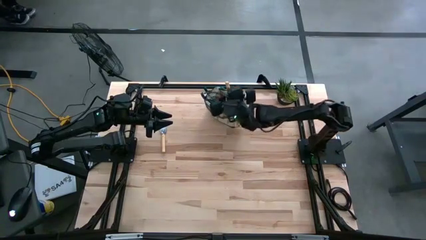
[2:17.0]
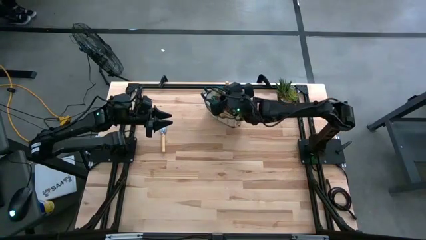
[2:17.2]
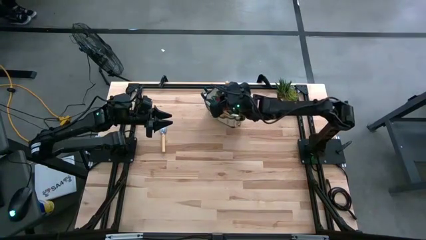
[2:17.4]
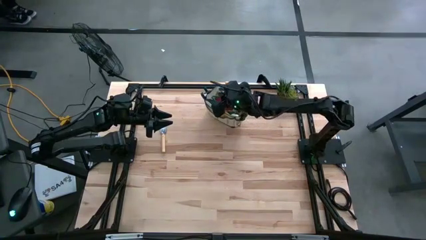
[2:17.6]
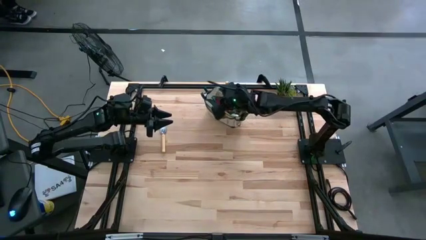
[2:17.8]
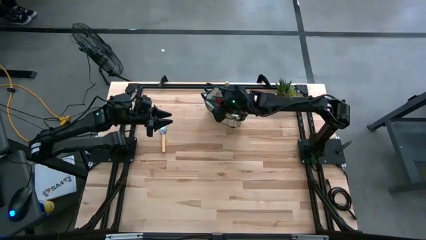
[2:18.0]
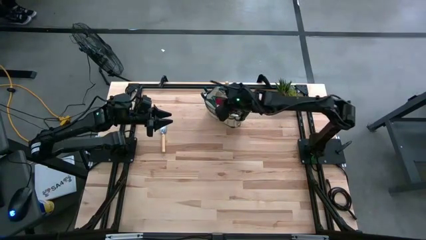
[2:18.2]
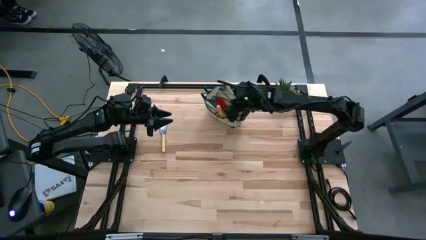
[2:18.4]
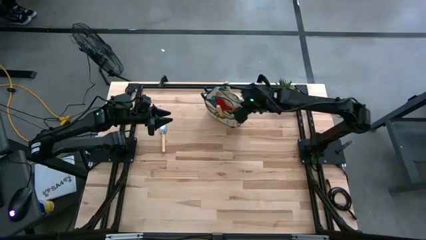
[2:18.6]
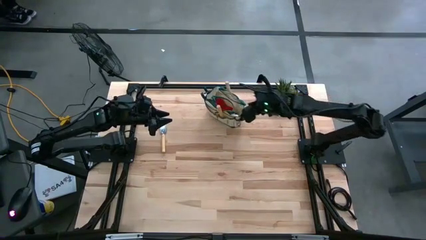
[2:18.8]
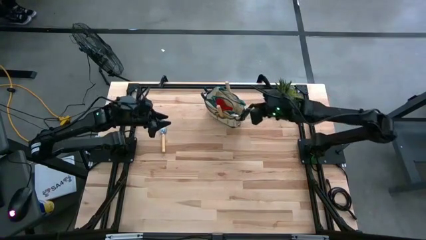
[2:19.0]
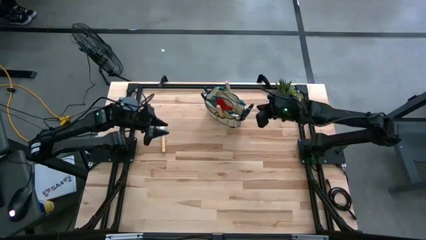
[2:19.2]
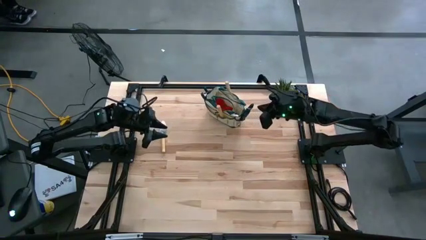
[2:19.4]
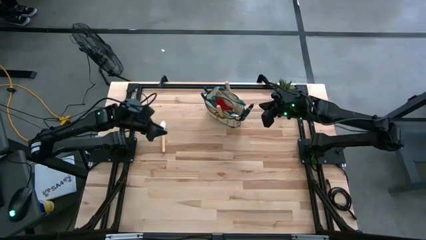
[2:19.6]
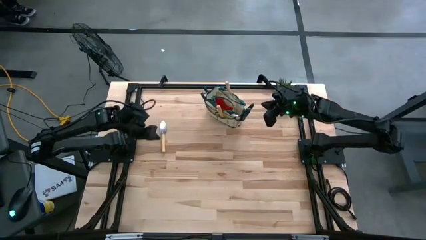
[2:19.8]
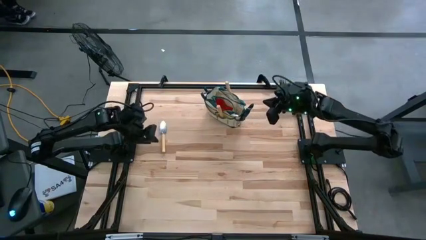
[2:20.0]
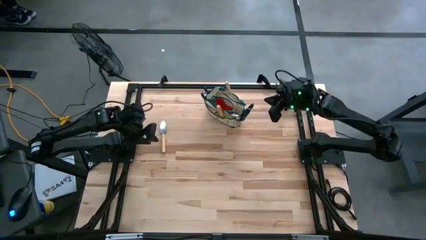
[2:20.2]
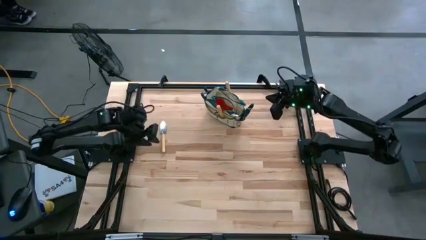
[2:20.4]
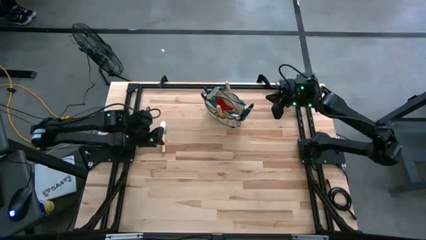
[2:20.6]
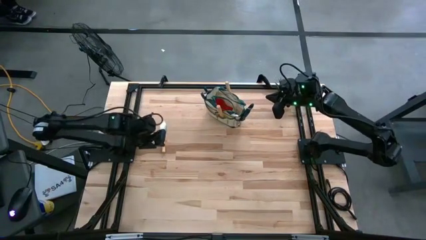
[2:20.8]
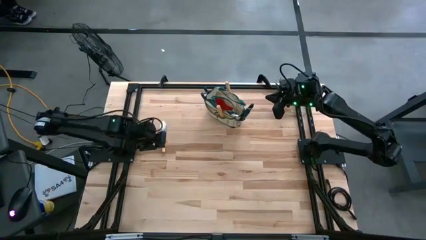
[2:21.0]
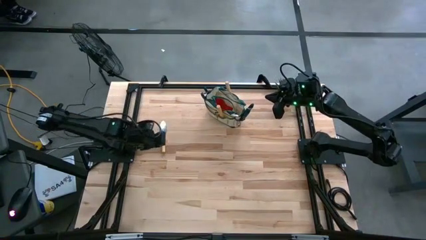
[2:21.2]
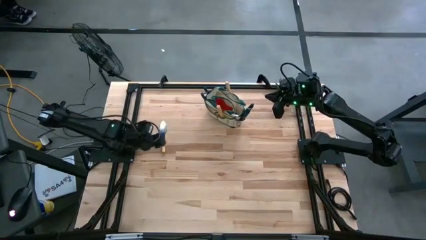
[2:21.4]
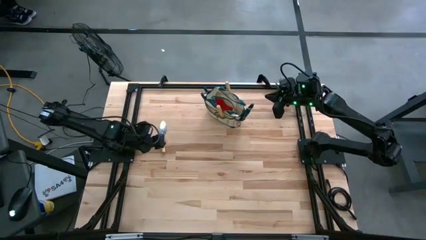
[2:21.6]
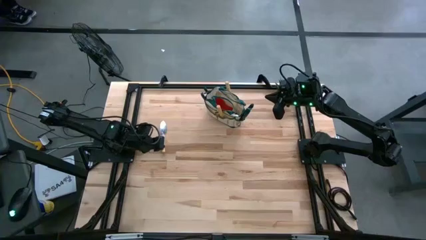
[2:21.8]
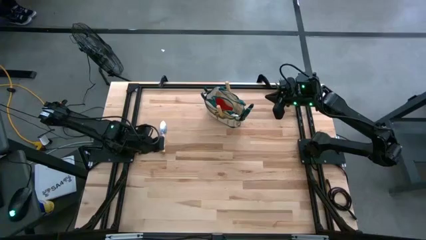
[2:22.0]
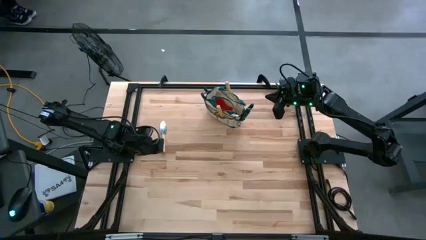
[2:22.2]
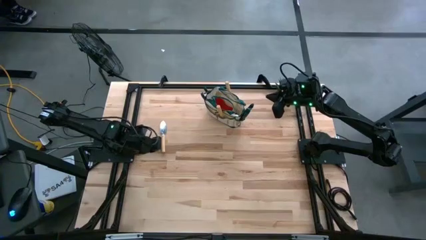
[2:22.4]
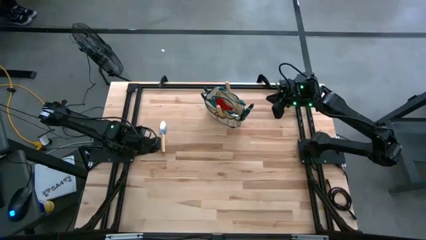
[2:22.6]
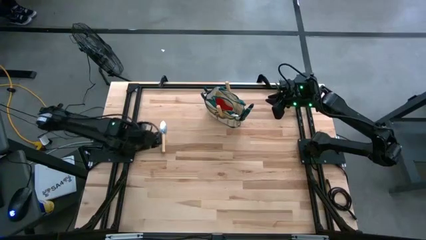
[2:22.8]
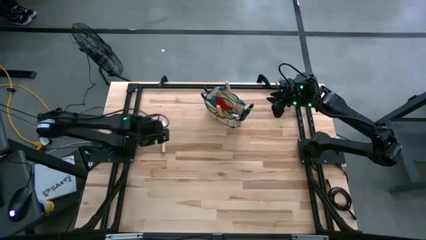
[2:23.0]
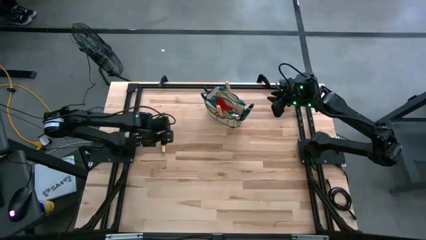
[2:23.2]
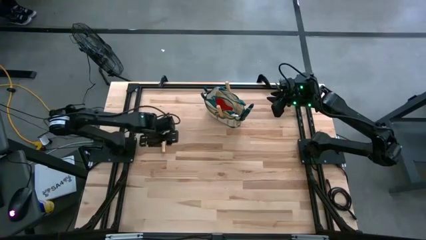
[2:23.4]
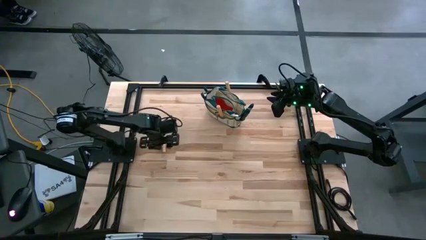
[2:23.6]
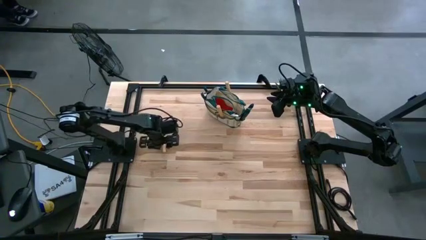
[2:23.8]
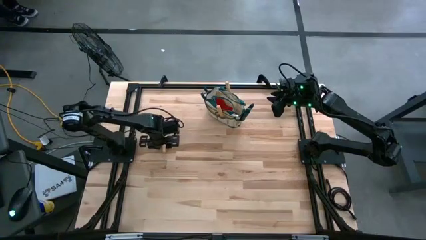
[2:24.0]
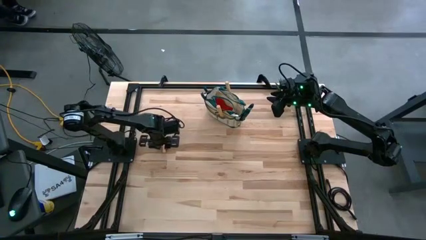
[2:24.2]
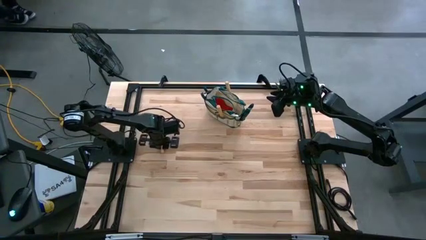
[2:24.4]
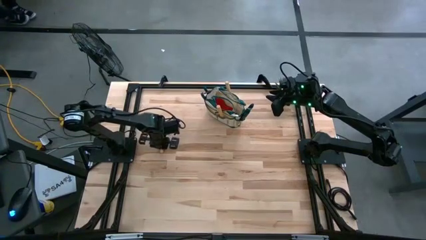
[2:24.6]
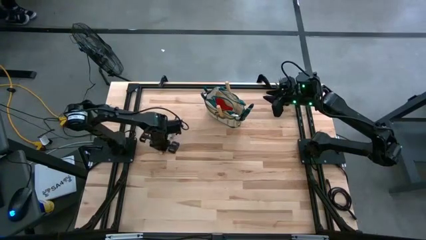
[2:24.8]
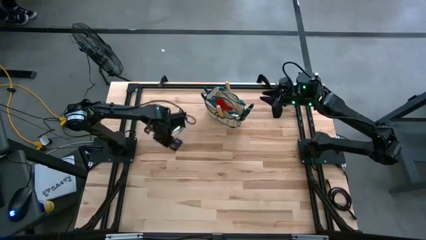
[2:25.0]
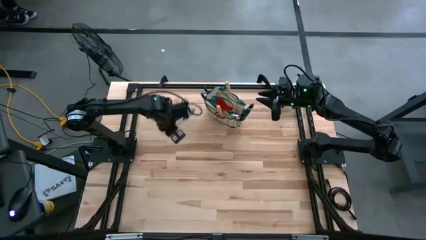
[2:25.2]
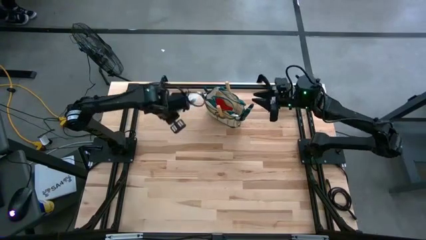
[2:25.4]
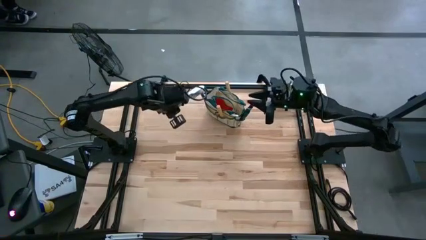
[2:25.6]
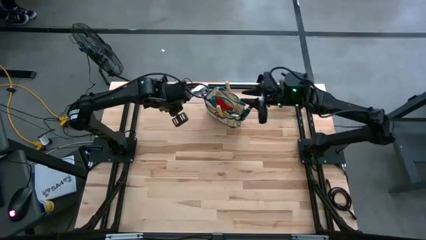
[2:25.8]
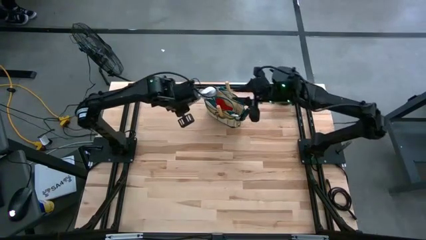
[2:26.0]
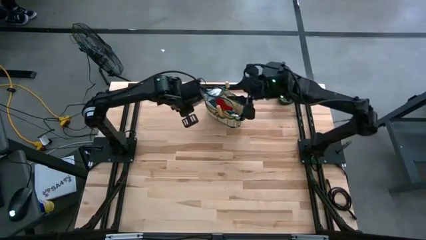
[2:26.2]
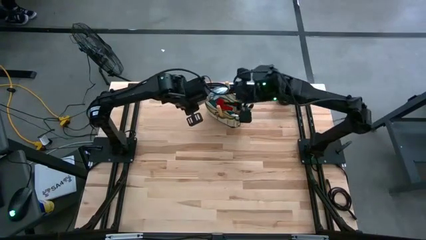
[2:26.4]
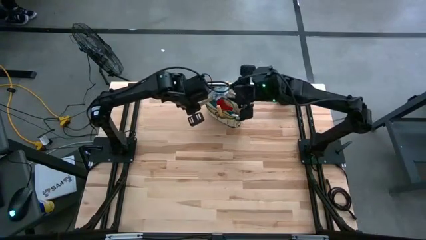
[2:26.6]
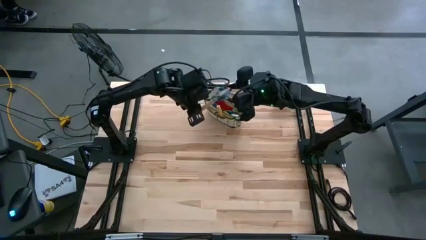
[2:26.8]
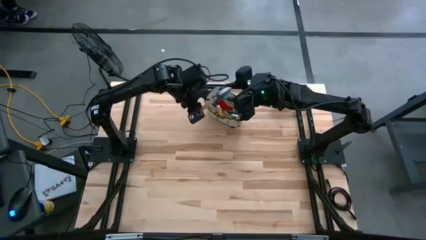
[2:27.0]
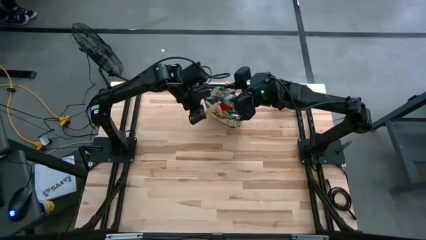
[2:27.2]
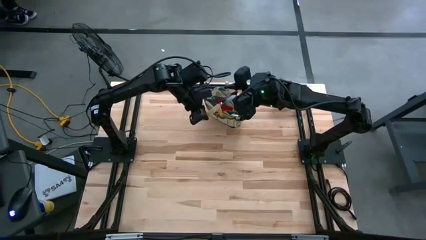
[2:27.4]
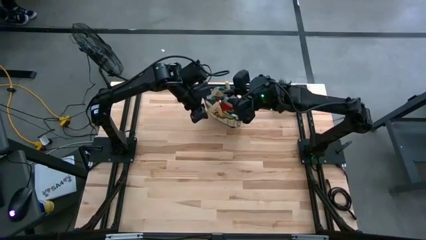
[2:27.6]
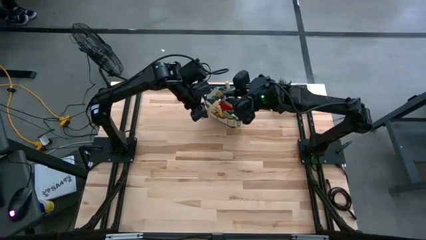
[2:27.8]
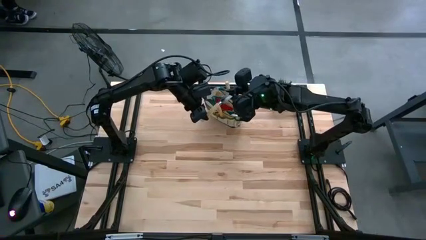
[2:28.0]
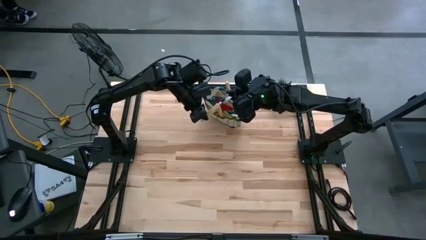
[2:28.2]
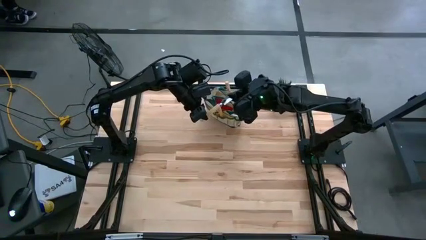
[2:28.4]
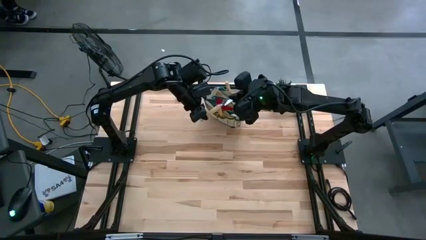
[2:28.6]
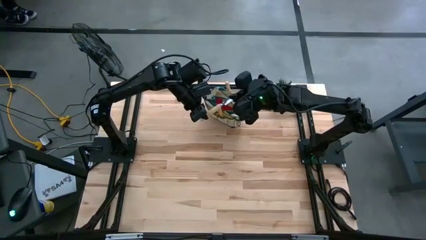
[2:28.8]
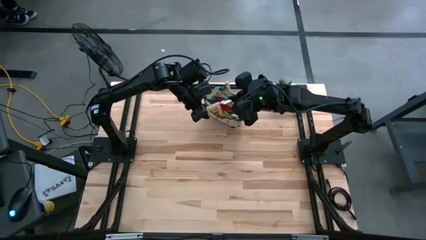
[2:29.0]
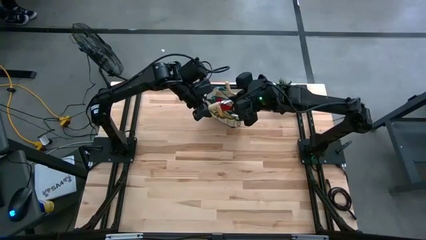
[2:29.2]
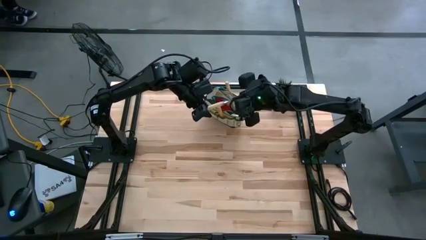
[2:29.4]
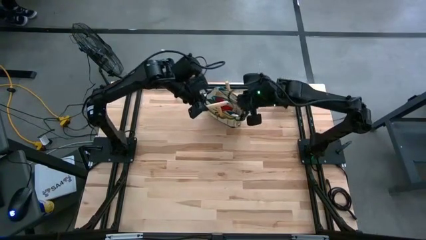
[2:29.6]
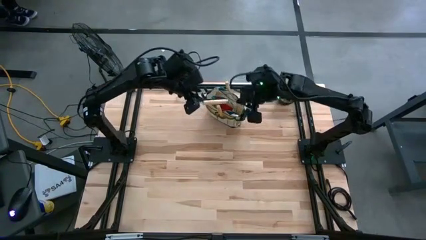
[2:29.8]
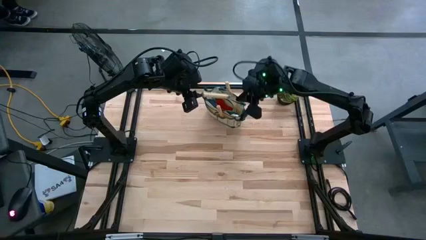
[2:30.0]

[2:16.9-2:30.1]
Task: Pick & Place Garden tools in Gardening bag
Put the trowel into the gardening bag

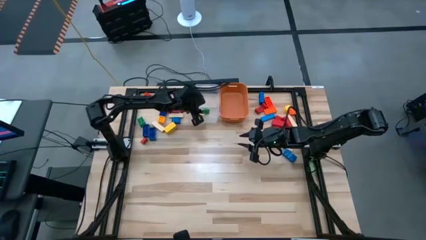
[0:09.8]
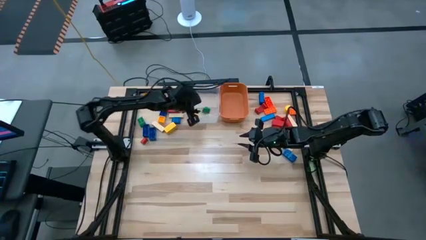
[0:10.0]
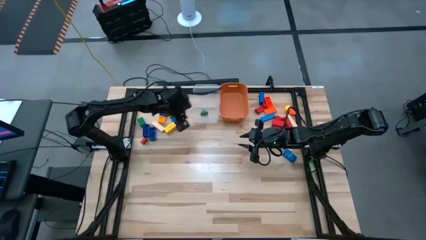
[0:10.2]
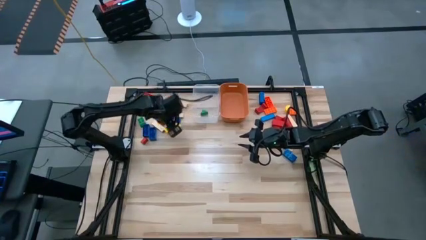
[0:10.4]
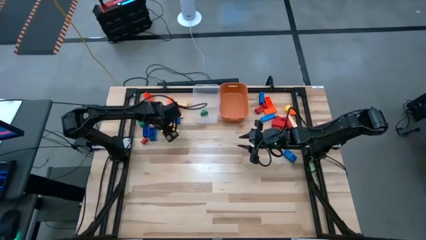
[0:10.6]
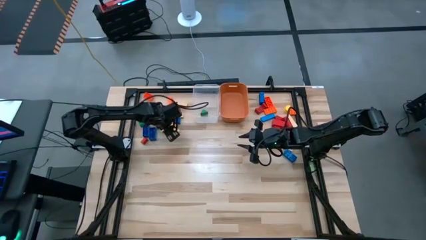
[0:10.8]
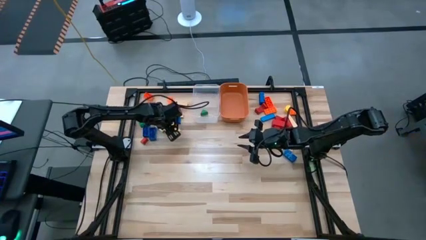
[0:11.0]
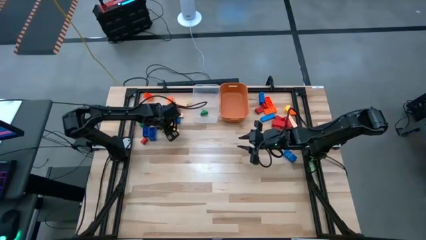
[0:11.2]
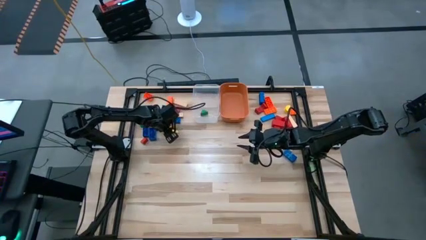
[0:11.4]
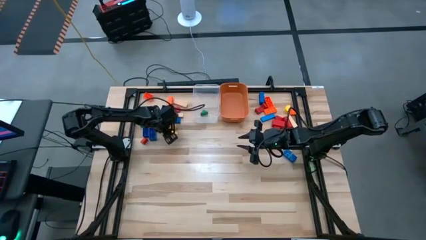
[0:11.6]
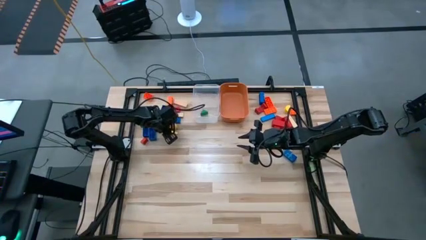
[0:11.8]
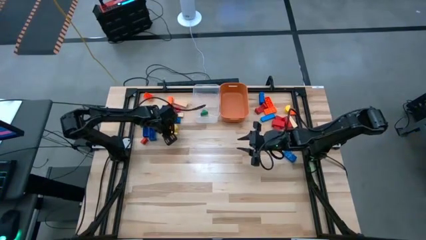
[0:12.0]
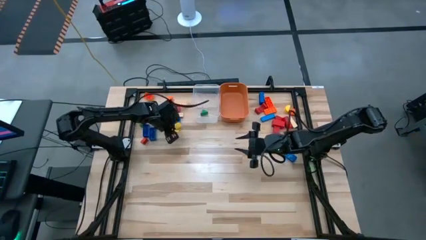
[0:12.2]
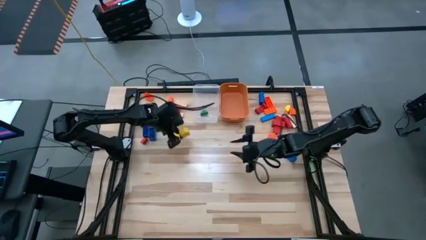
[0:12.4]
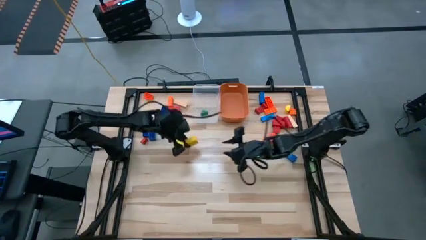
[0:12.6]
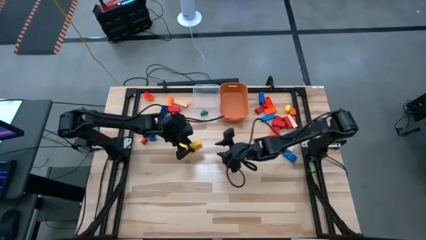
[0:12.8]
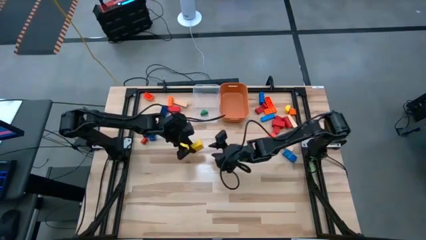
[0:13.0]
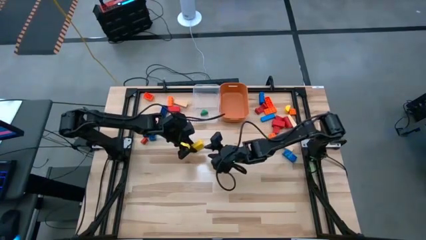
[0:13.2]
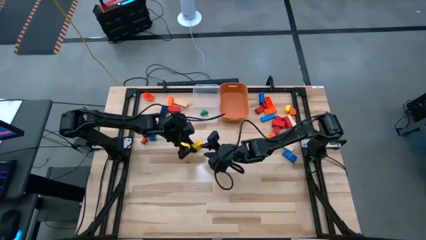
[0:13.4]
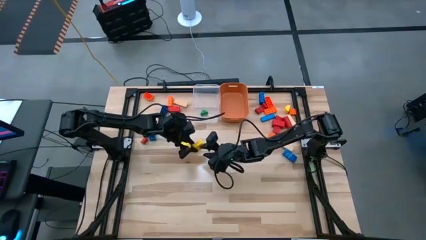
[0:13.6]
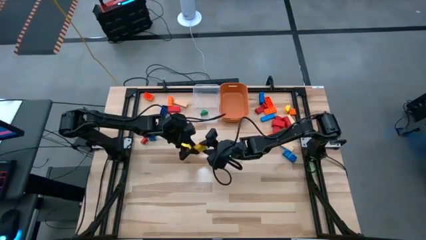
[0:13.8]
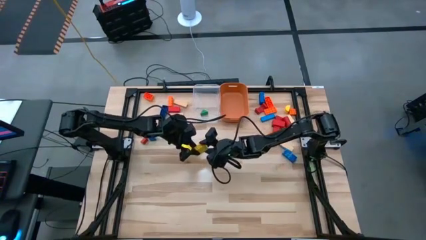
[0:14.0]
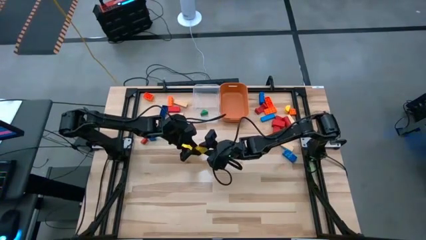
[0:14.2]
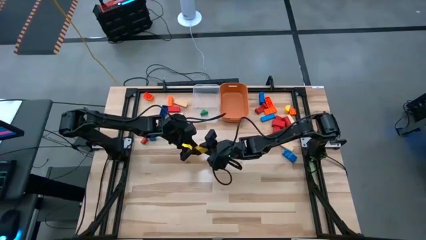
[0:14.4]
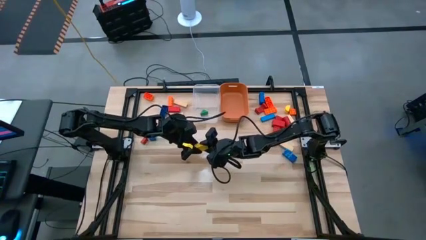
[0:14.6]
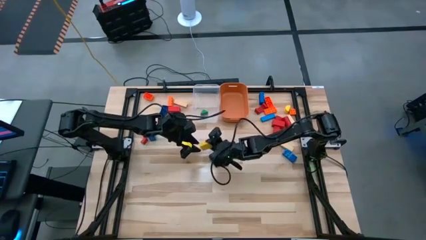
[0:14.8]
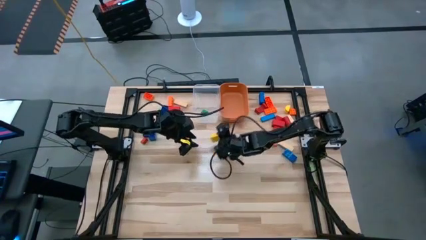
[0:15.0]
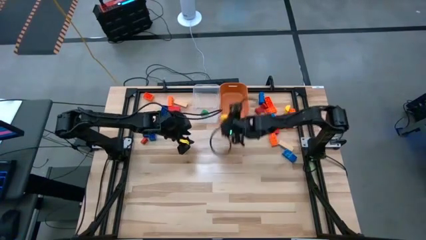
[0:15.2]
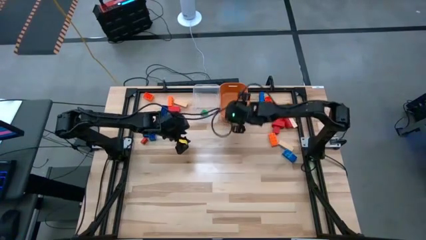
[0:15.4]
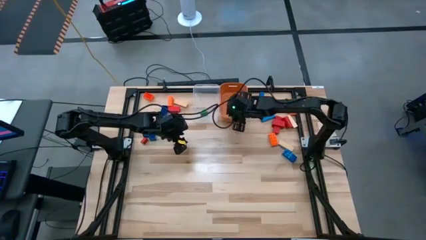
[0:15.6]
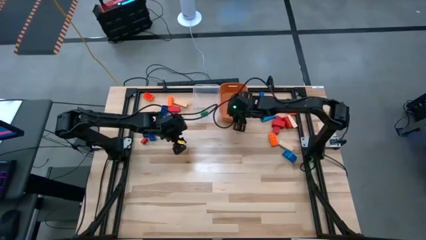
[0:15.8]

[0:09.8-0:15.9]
Task: Sort blocks by size
Put the yellow rectangle block into the orange bin
